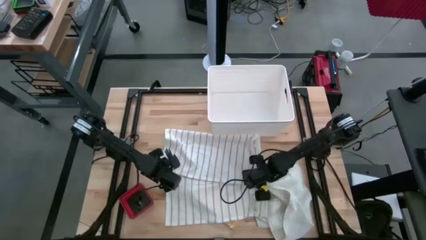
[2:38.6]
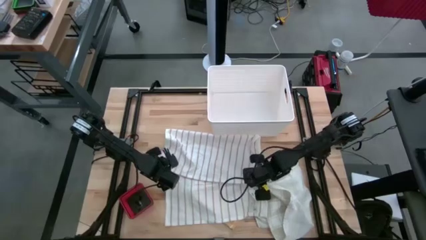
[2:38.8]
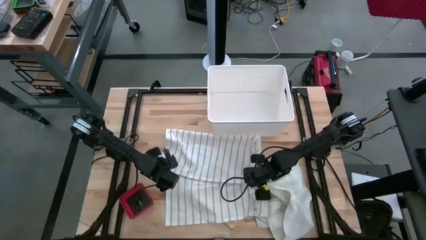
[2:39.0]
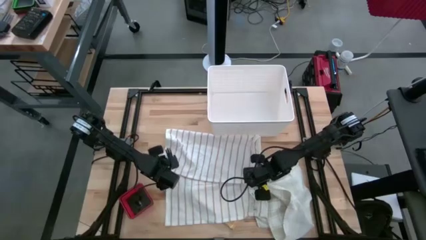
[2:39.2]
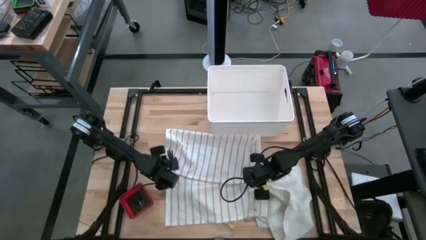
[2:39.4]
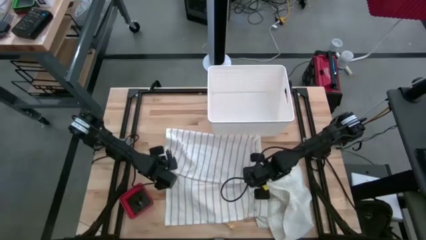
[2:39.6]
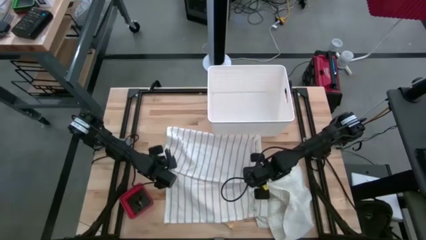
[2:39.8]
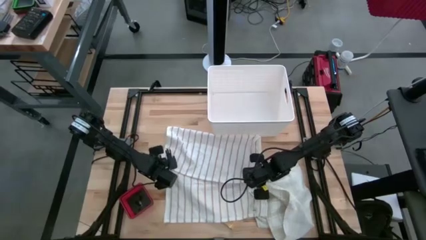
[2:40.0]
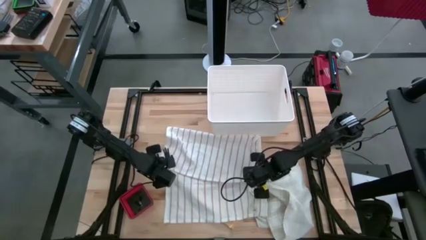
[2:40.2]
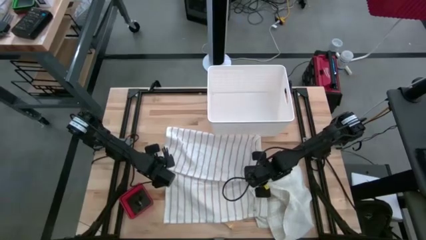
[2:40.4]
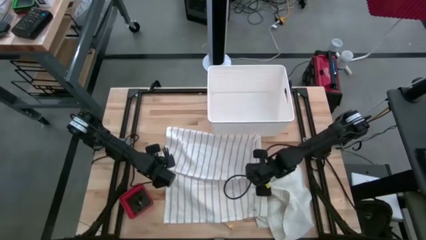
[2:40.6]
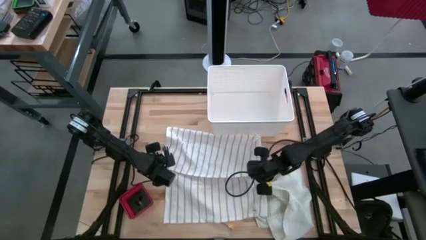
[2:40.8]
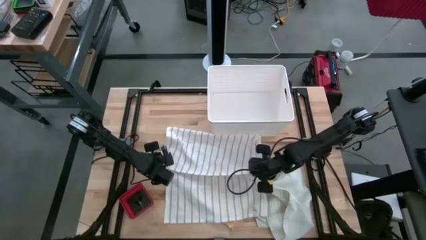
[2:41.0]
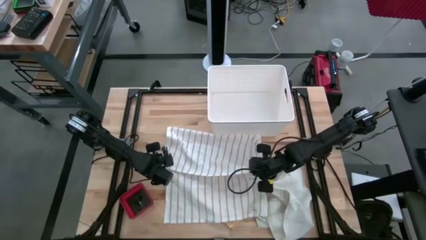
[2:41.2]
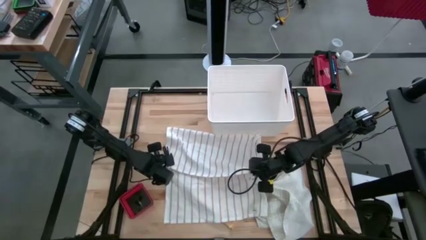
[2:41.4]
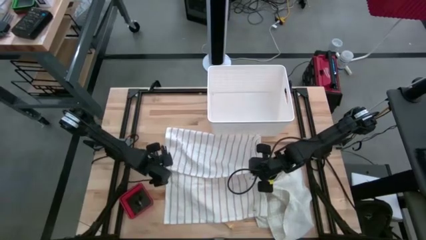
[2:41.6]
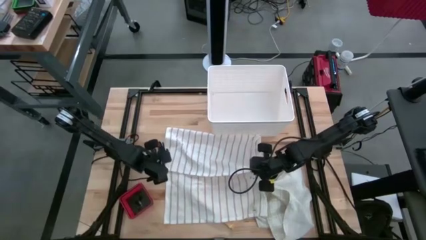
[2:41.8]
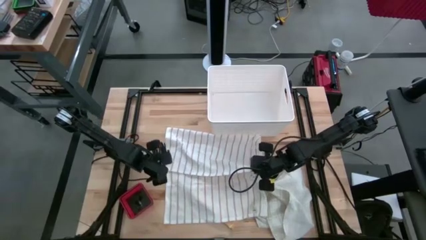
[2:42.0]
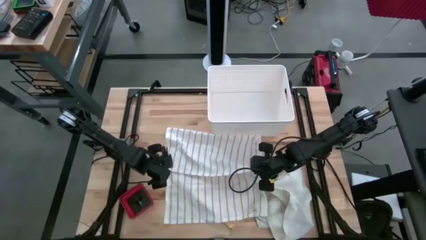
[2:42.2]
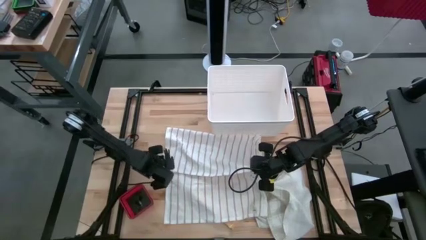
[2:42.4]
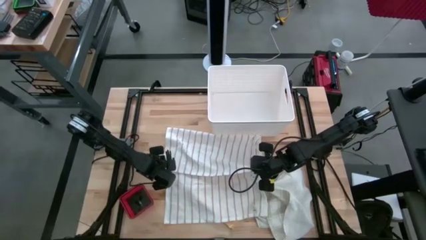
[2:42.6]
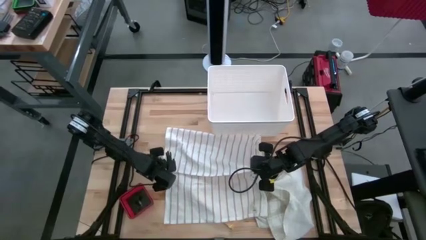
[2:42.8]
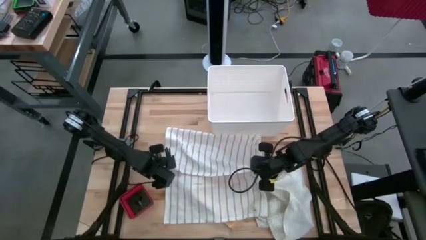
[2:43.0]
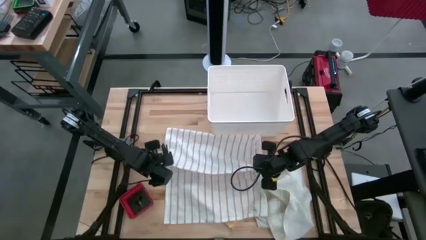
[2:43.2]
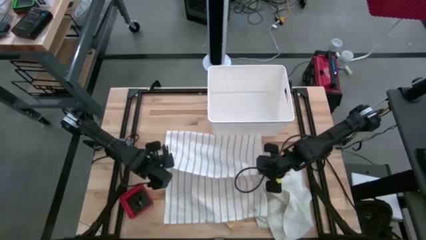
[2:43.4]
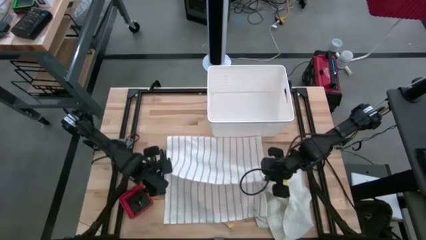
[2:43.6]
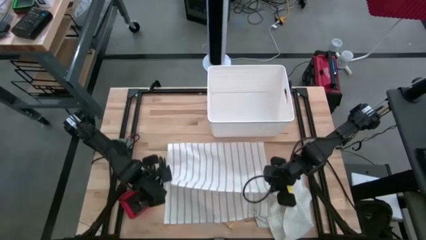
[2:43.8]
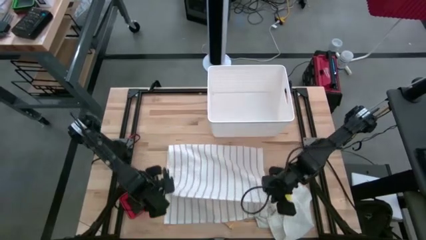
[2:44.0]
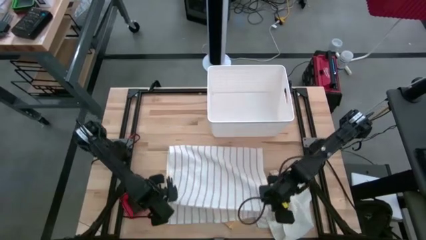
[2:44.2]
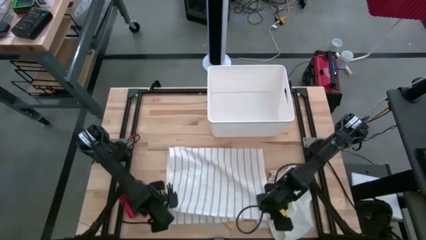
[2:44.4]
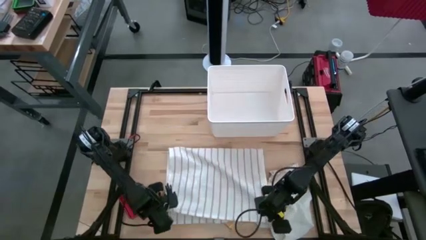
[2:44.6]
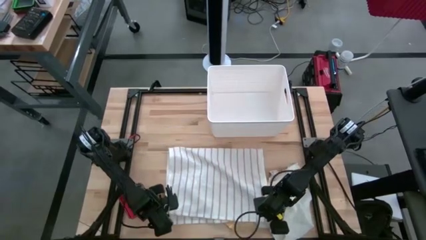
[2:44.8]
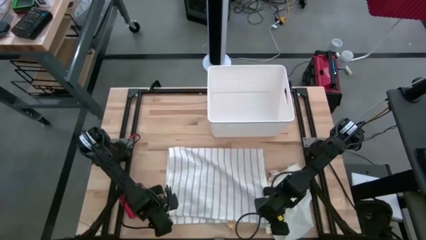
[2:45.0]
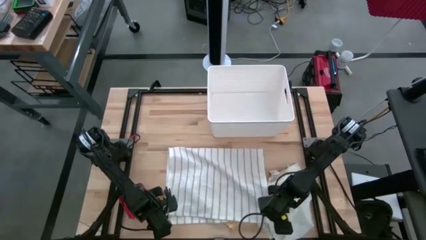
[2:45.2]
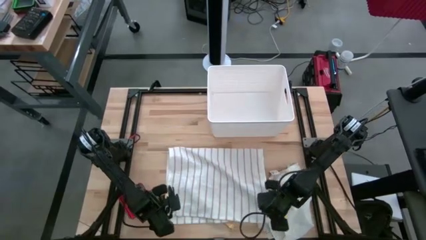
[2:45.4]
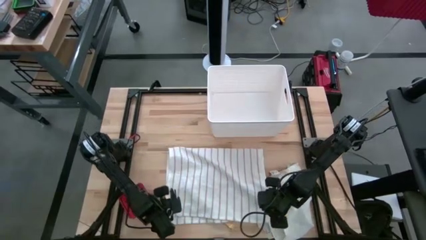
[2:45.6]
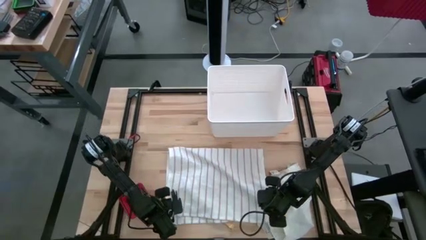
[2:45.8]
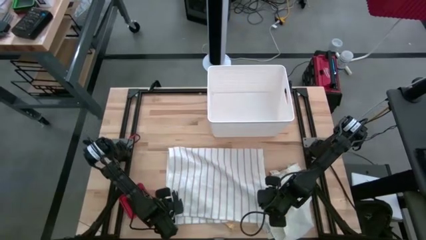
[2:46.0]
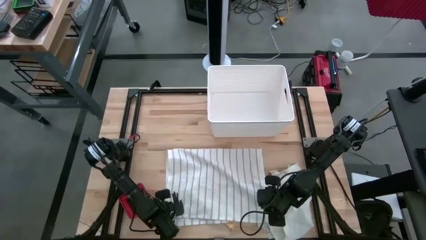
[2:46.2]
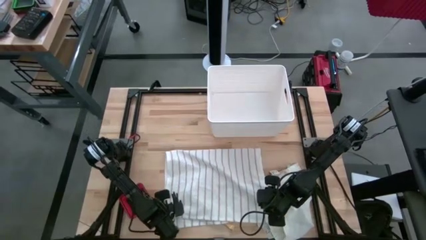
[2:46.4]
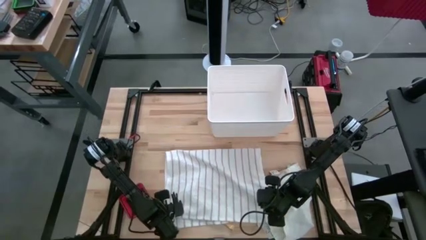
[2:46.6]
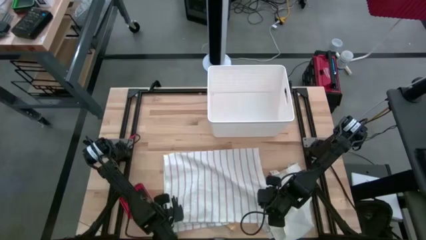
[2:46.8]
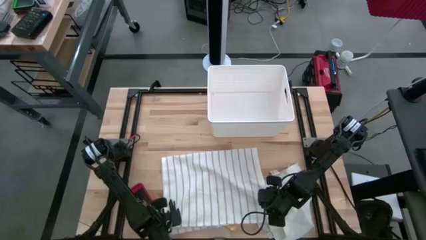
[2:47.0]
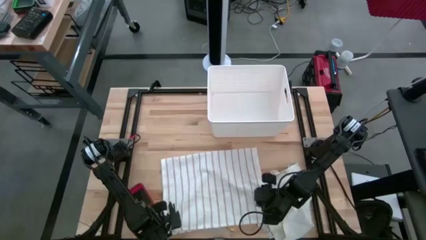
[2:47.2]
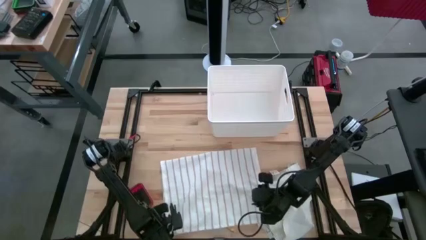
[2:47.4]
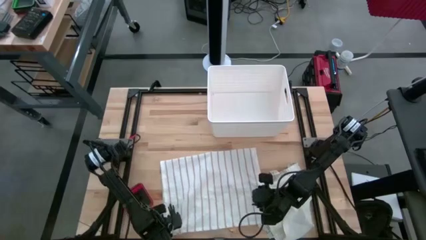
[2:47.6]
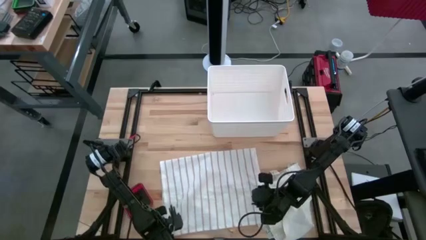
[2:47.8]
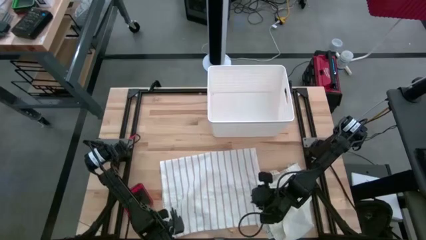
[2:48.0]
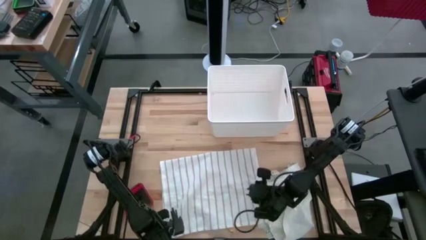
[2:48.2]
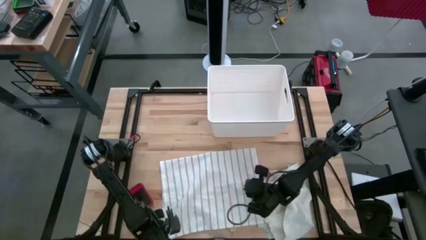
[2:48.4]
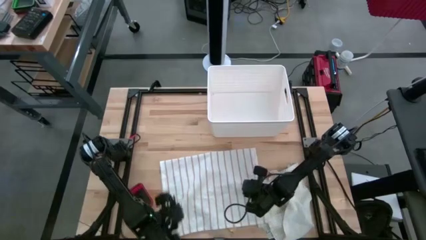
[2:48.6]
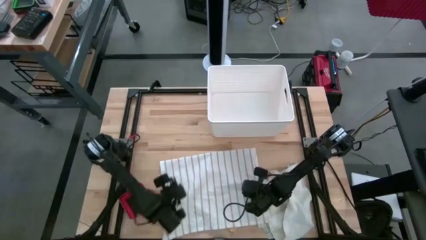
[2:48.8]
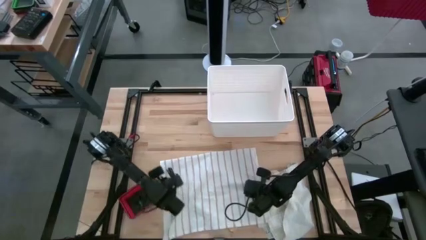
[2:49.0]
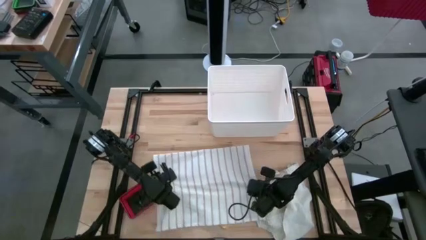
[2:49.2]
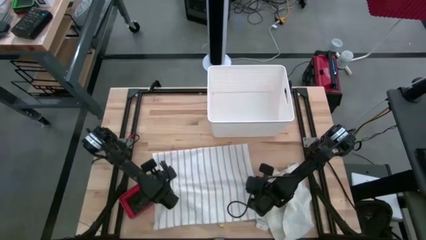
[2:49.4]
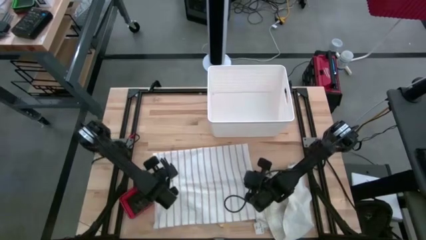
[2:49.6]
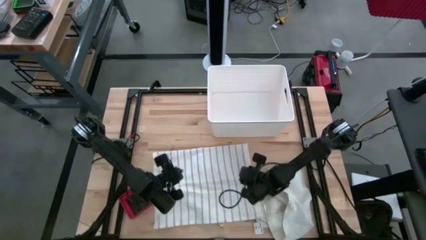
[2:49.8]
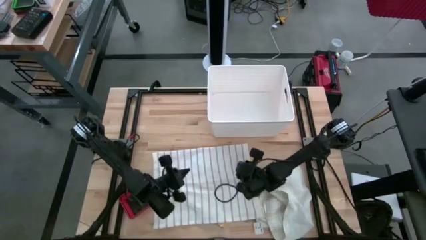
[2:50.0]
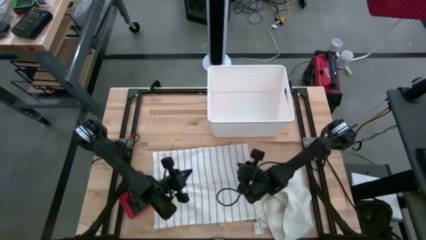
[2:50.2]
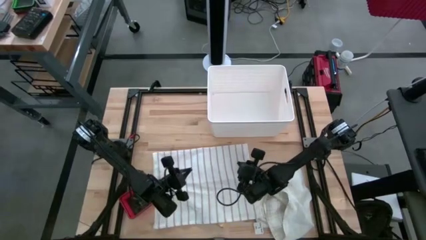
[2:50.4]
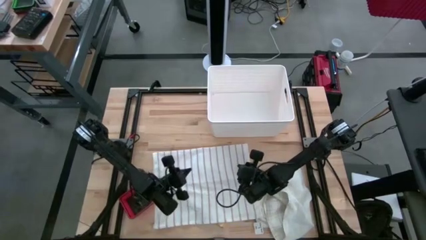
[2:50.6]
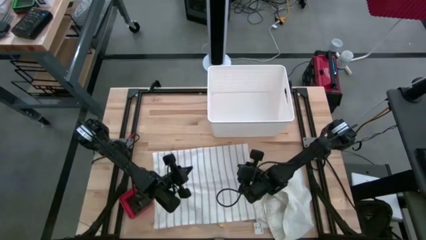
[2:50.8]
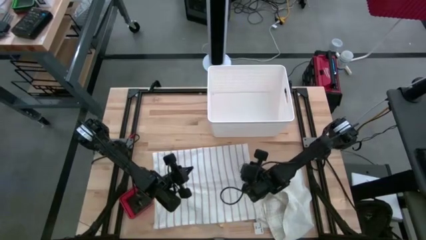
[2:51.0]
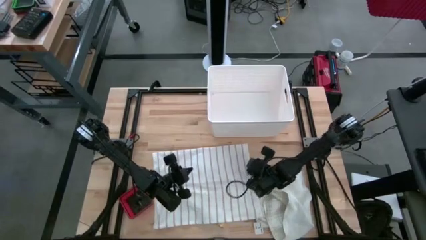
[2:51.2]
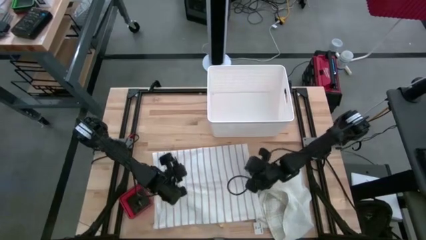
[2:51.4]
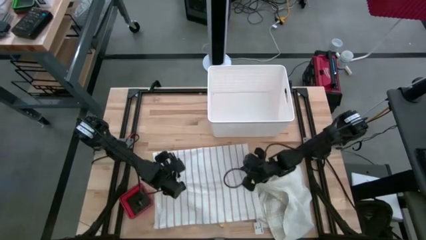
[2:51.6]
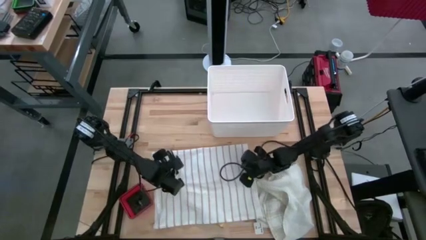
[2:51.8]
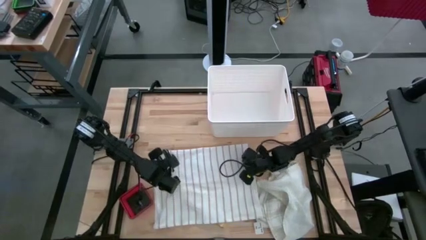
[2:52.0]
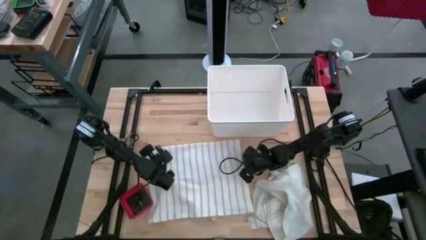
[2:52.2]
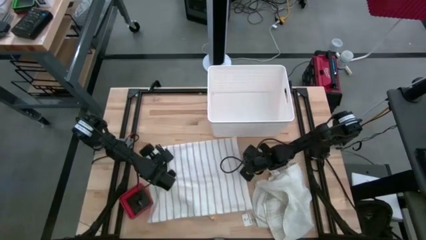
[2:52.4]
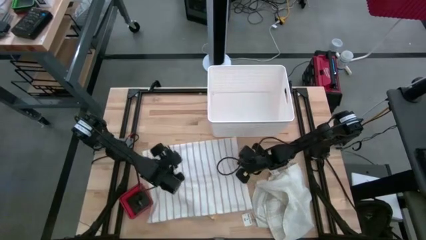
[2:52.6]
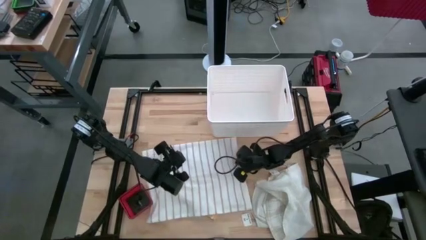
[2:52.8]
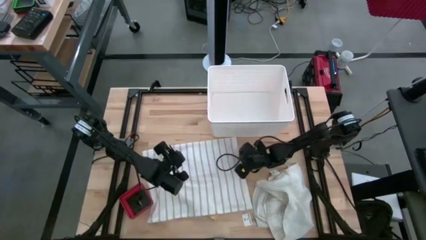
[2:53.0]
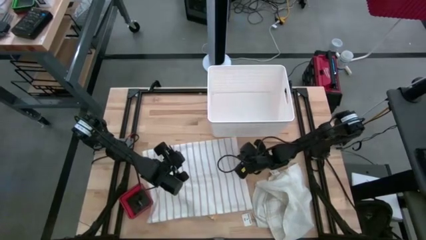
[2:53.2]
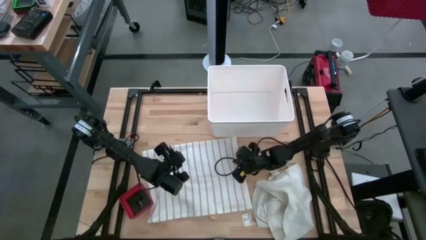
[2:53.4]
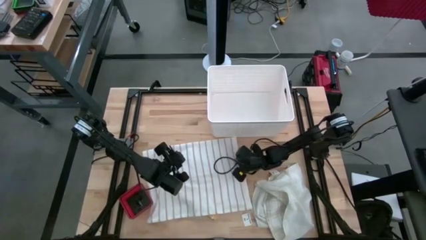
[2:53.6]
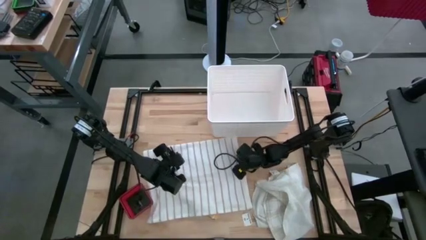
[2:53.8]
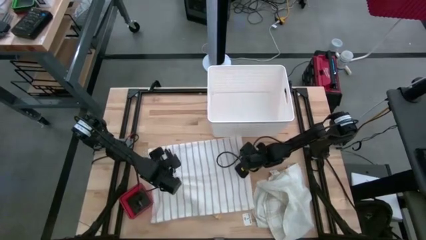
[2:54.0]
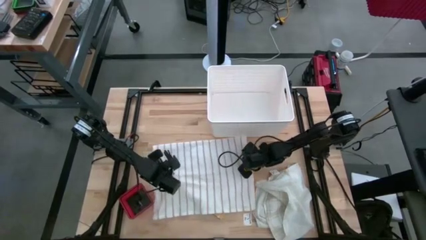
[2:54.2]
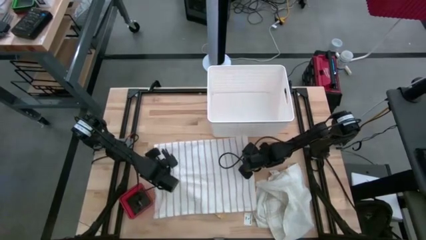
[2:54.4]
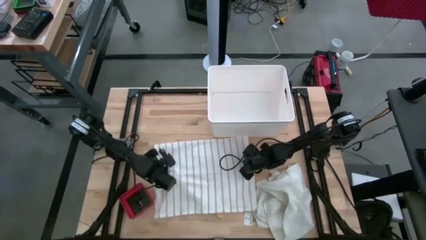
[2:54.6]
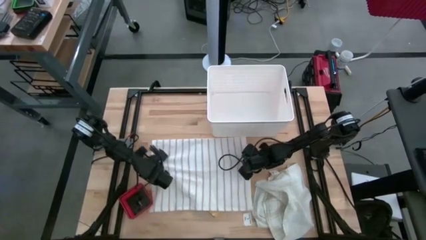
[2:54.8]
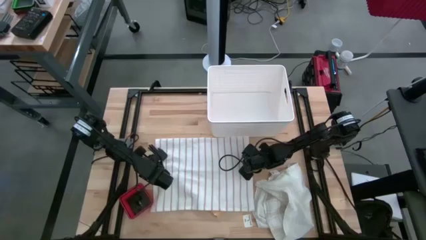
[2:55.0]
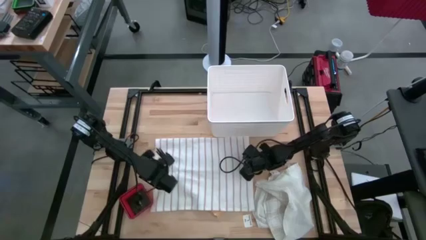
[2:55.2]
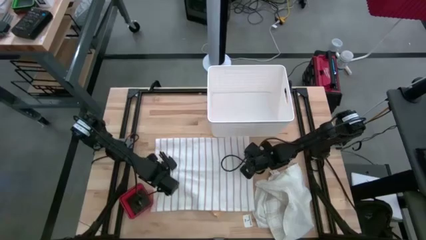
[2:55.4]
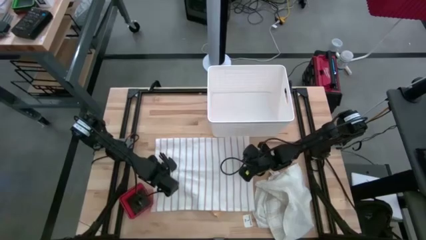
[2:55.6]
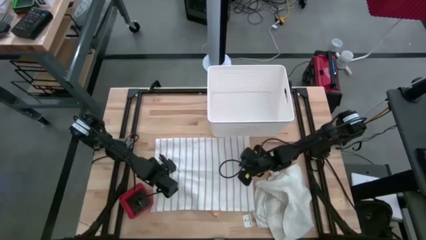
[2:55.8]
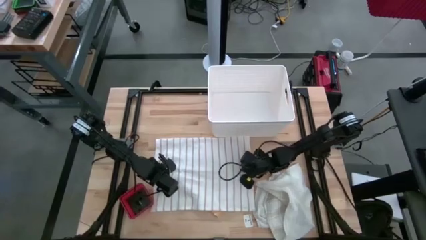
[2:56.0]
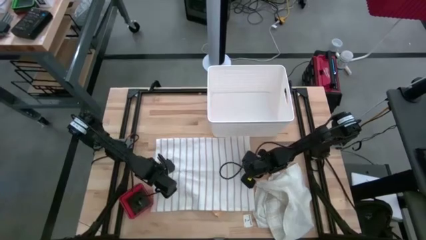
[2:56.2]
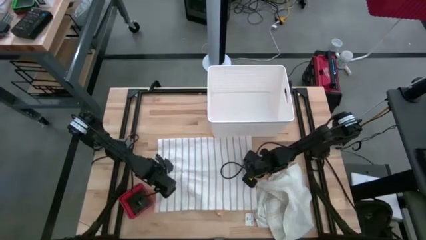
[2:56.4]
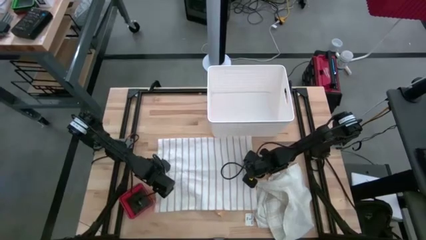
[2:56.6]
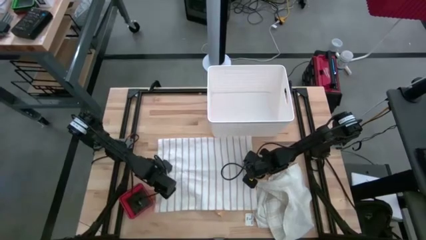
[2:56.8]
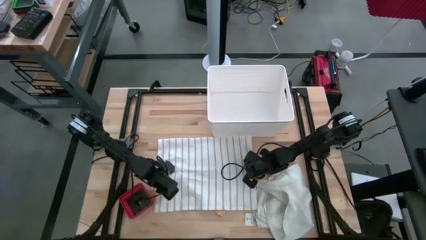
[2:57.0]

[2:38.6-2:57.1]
Task: Fold towel
Fold the brown patterned towel
